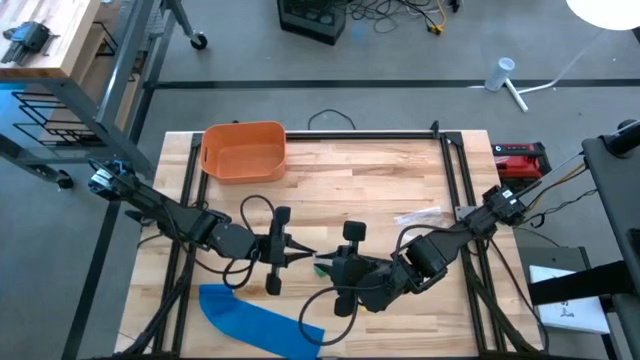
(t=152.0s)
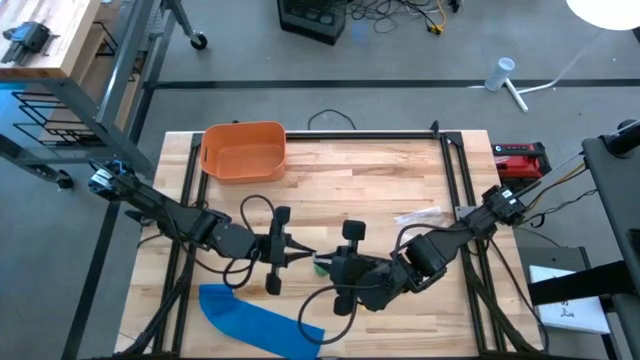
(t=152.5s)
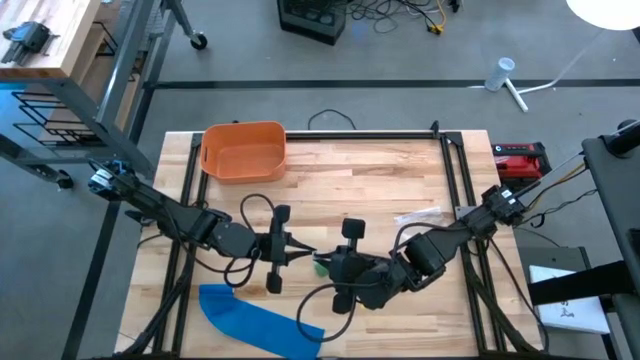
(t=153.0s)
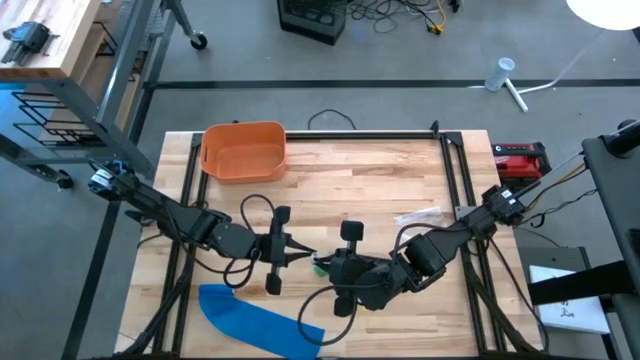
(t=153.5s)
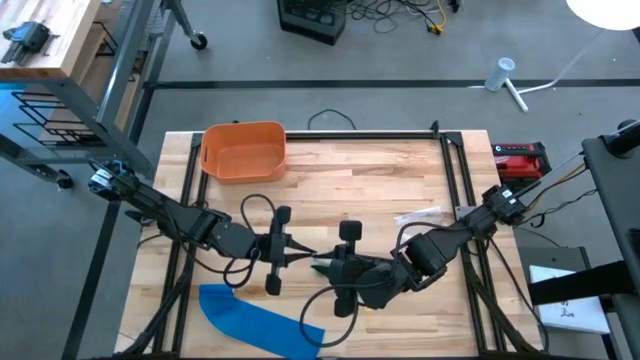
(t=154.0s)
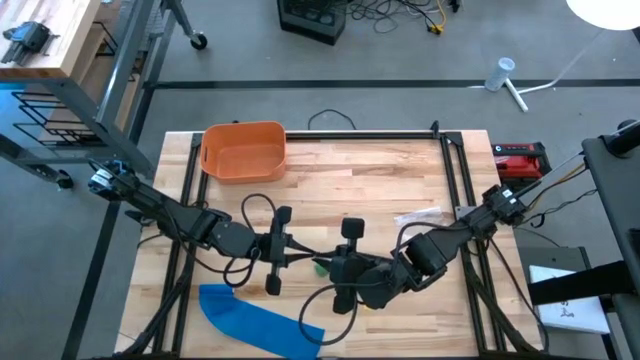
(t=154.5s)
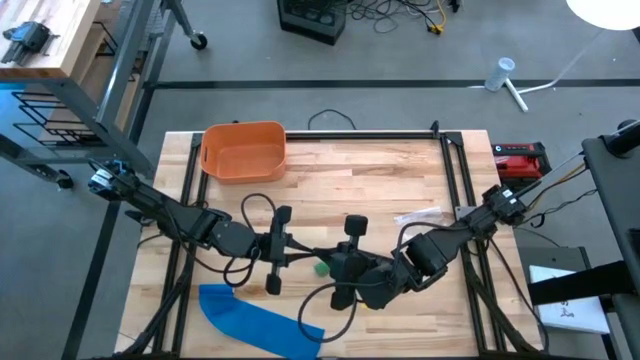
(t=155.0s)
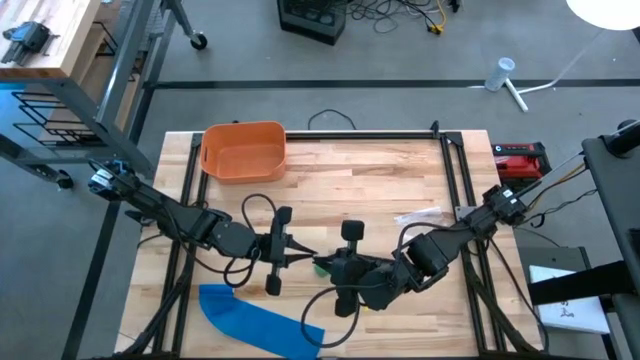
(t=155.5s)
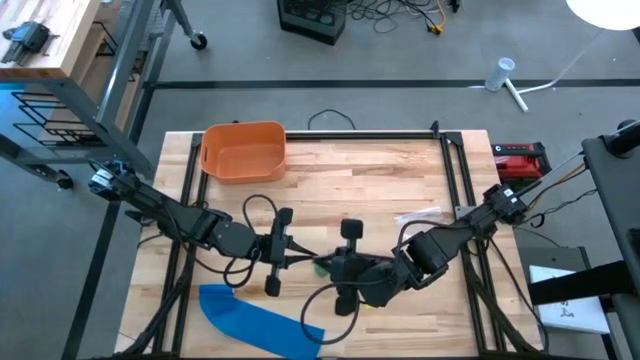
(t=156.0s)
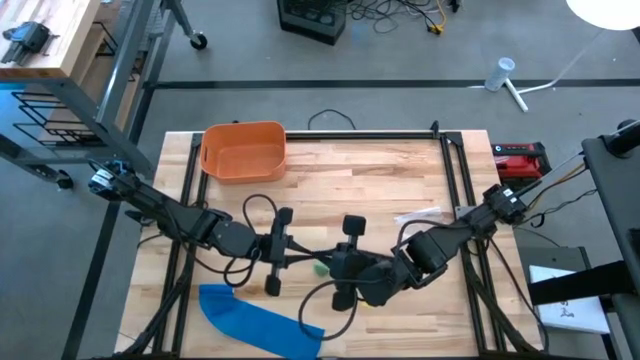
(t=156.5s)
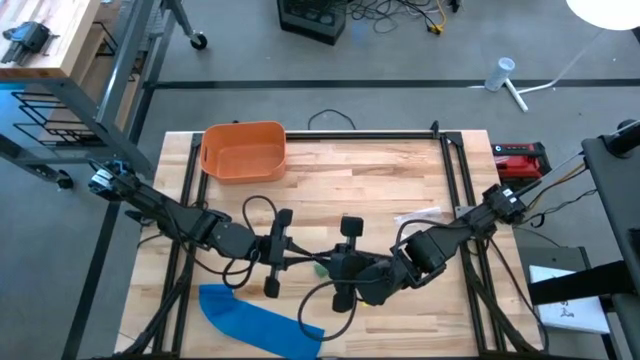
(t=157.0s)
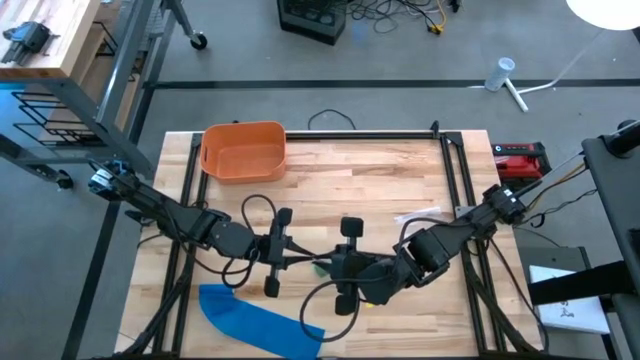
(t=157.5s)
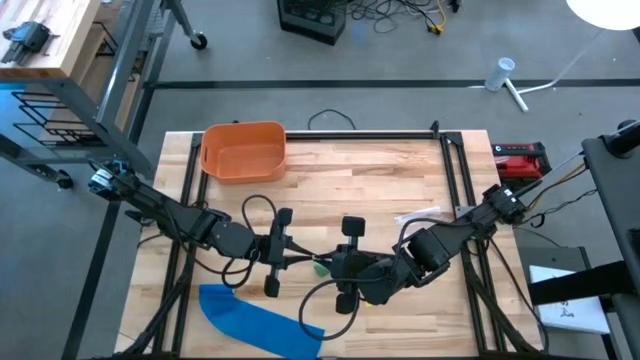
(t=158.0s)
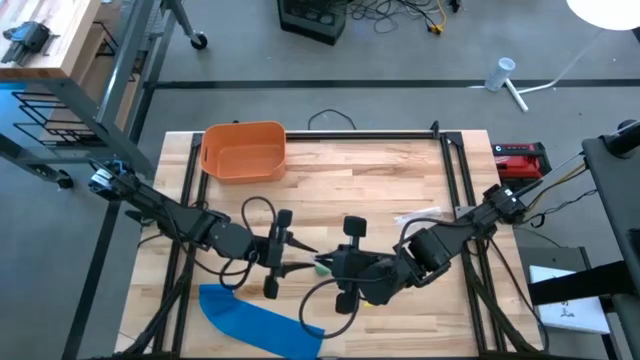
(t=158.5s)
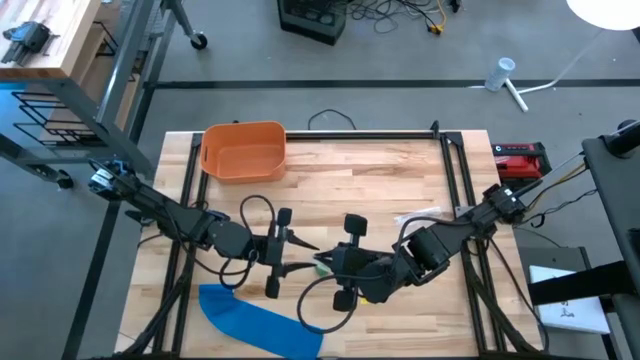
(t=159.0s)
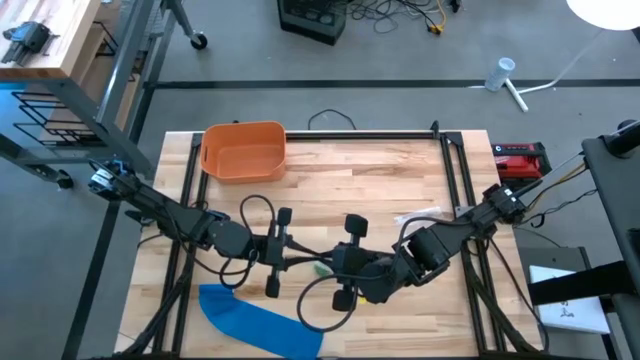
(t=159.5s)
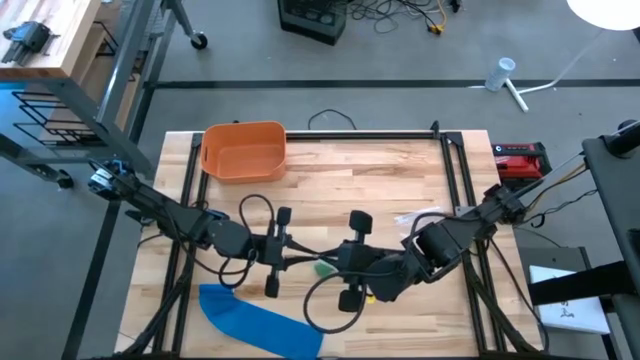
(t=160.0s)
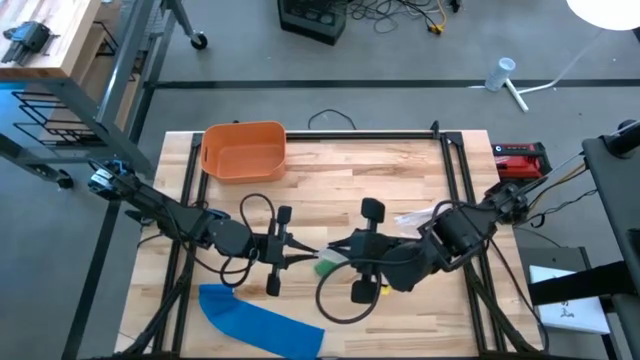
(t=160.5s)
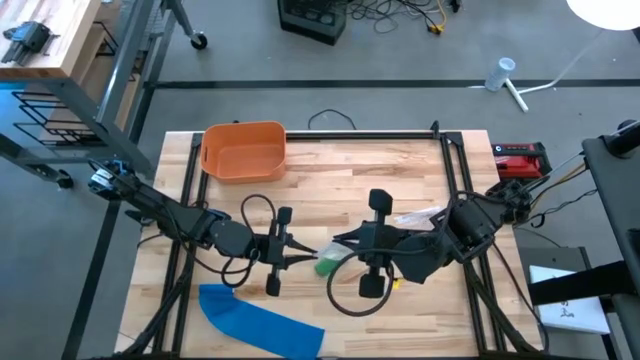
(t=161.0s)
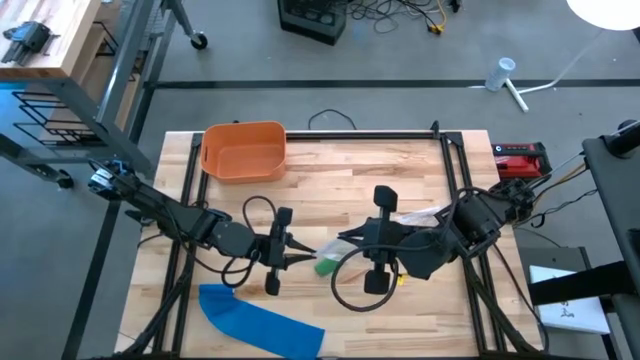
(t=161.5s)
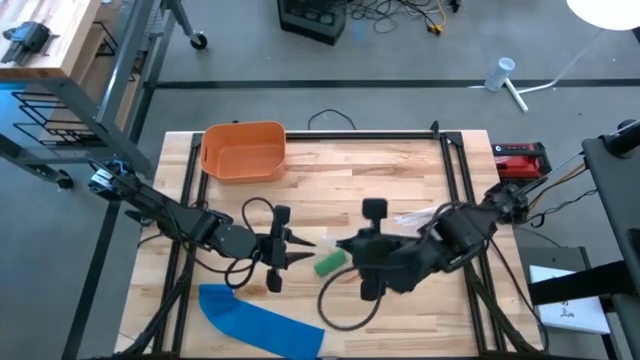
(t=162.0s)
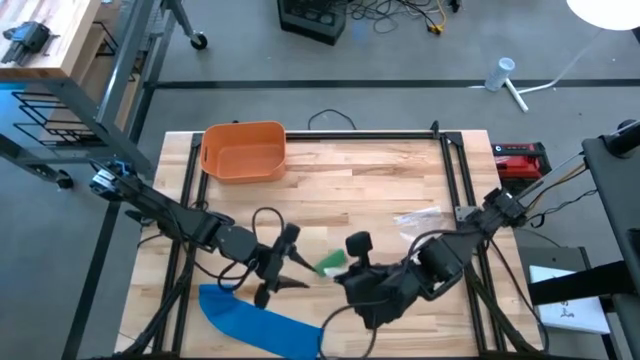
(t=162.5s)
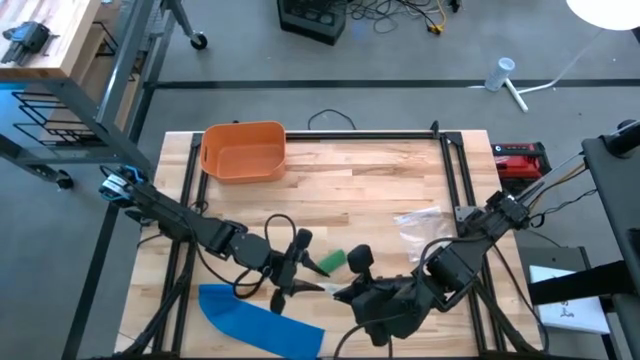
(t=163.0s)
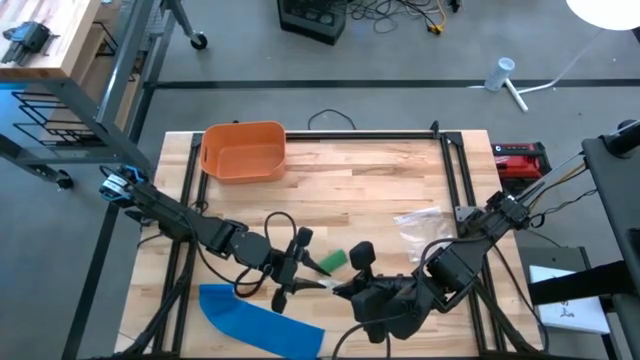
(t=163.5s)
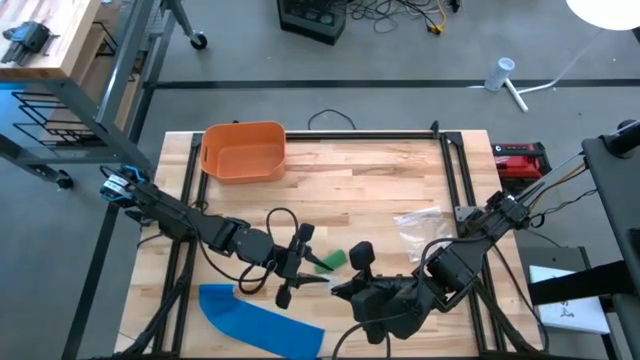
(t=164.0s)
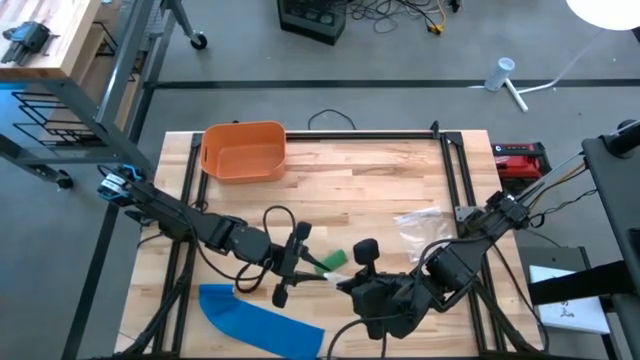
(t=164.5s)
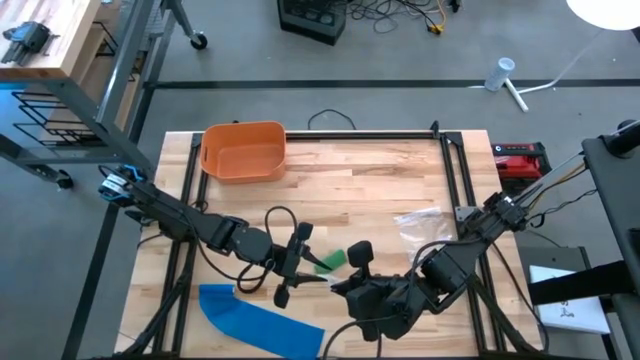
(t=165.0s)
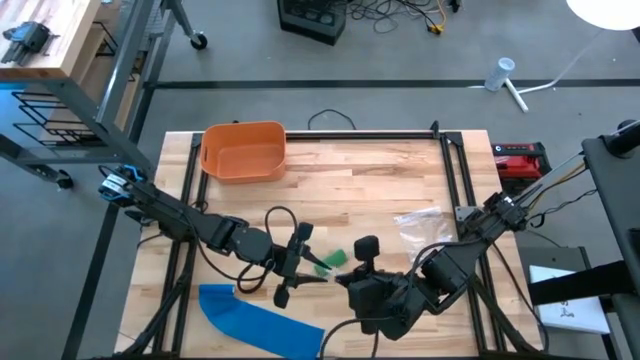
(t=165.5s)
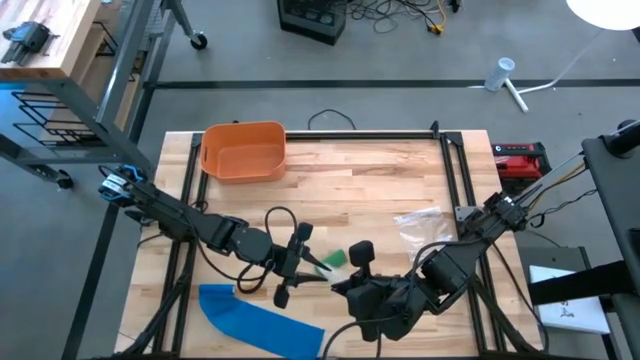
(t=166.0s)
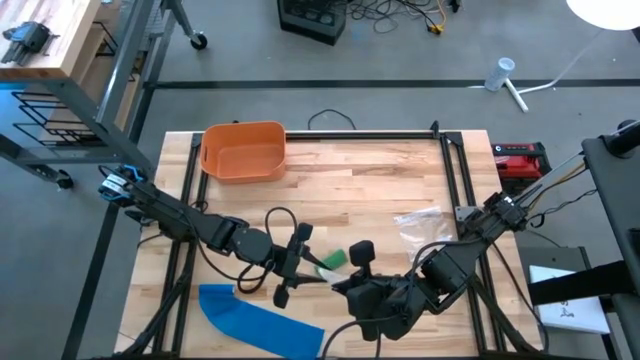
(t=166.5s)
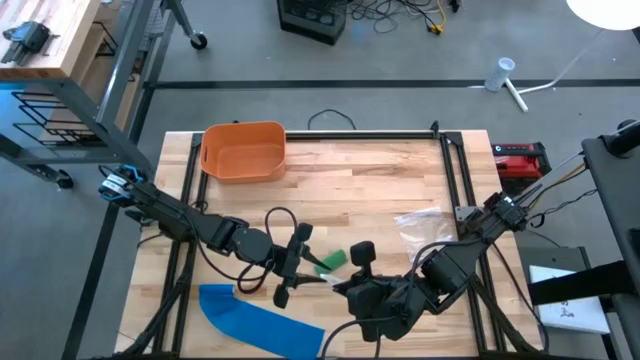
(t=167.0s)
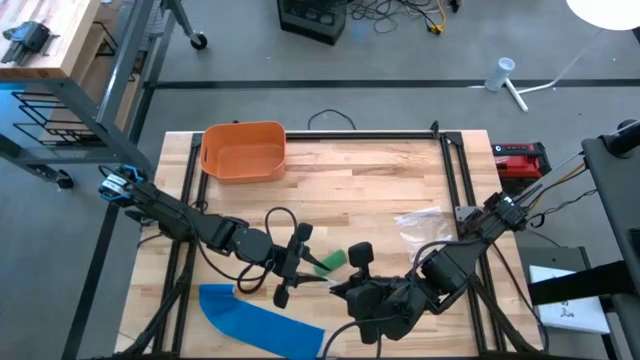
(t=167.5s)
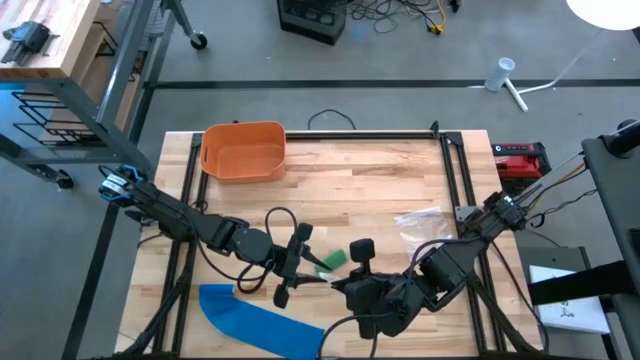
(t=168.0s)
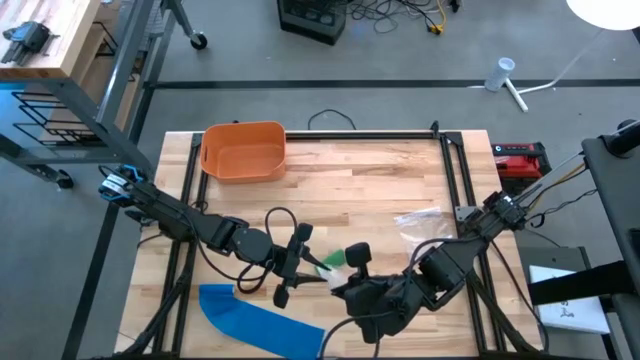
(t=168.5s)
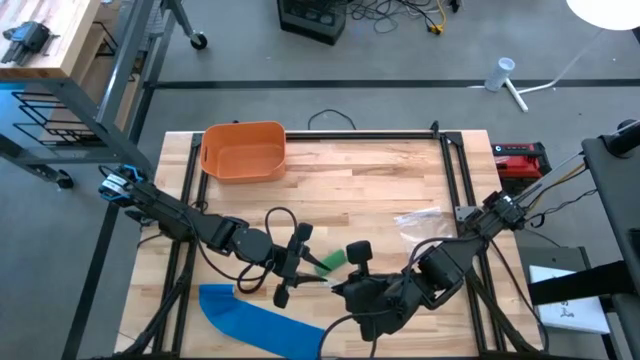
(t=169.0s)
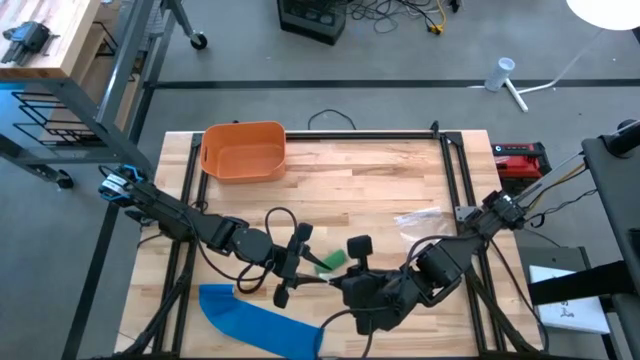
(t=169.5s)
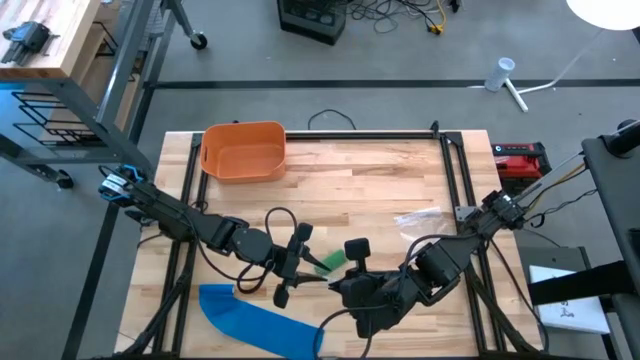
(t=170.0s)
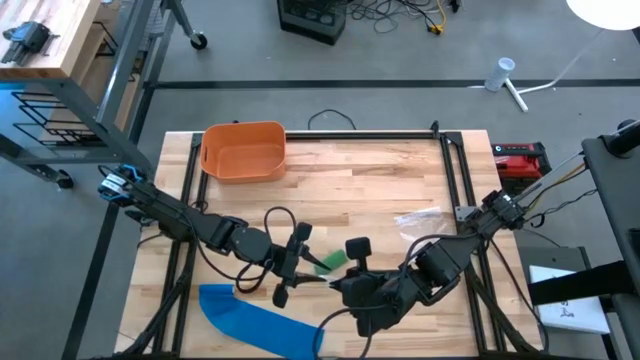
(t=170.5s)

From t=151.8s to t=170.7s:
Task: Roll bandage
Open the top transparent zip bag

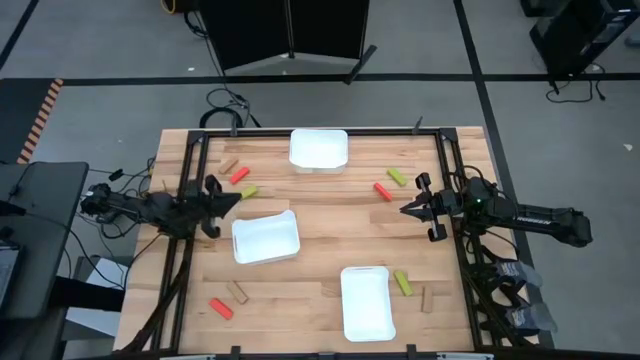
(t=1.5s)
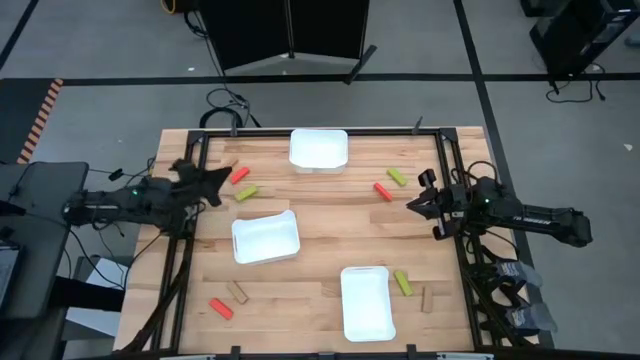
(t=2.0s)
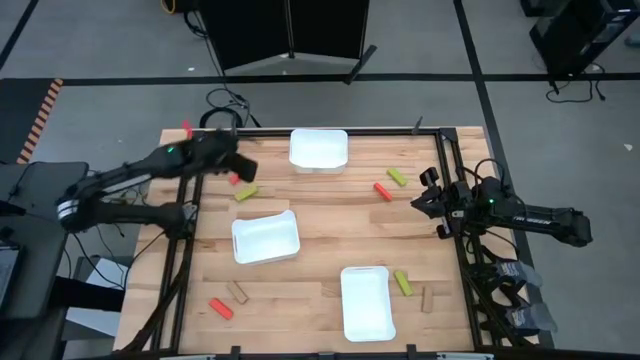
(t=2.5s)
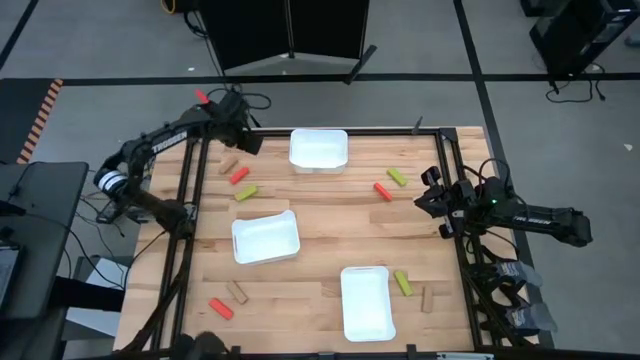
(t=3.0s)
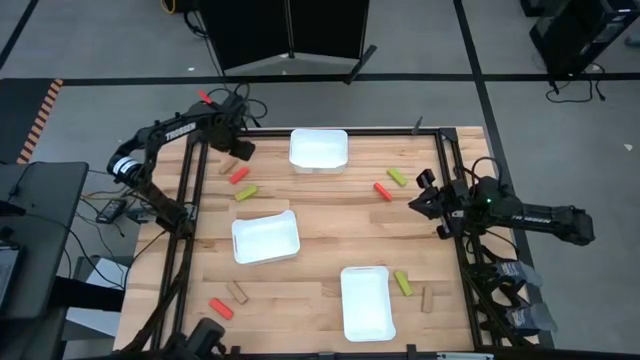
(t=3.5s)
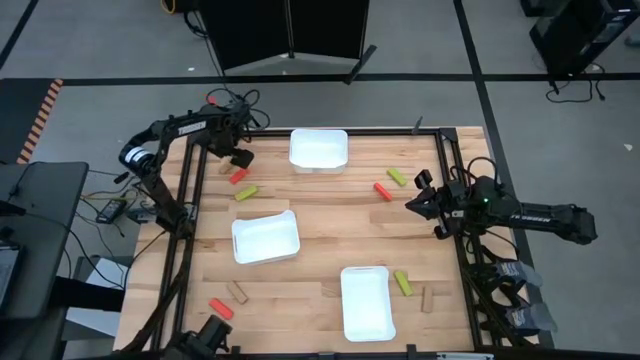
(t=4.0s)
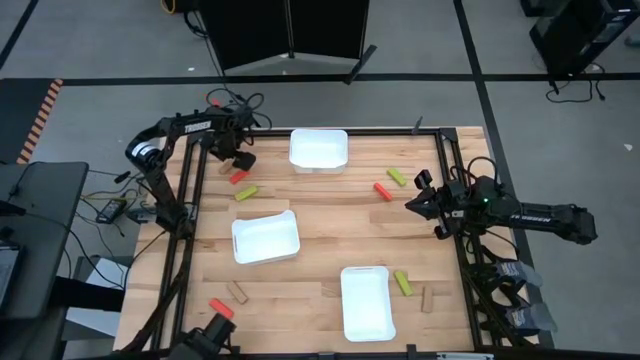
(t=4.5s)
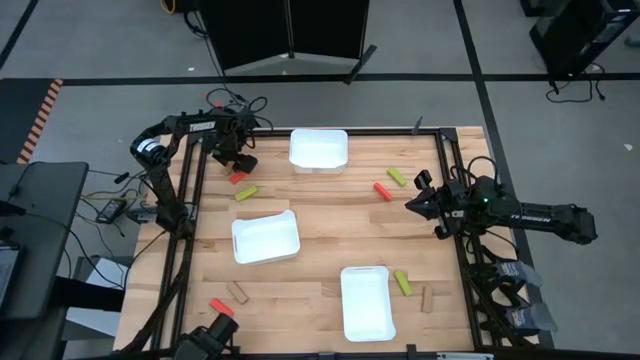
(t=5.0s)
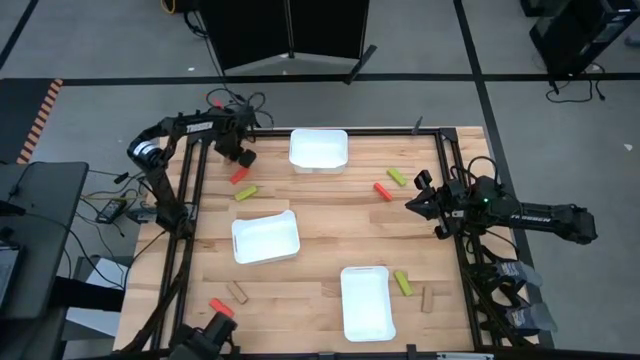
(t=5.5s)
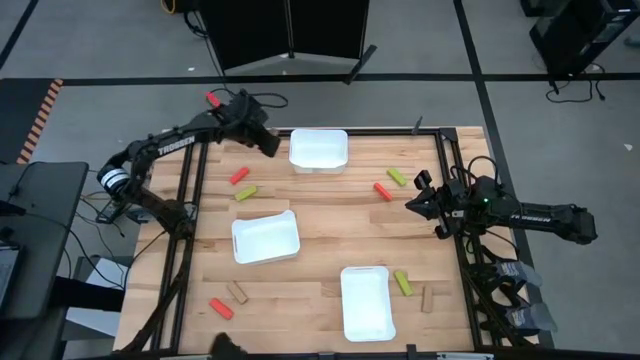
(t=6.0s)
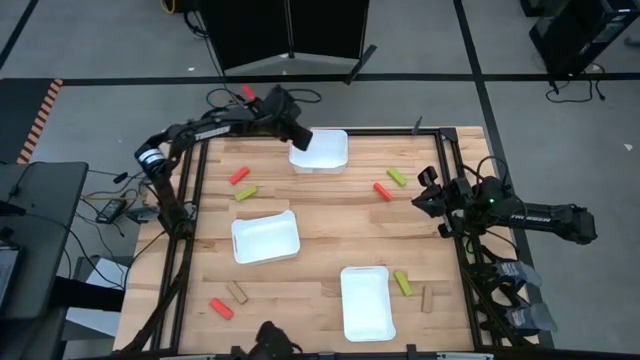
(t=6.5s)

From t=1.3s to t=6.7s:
Task: Sort blocks
Put the top light brown block into the top white bin
